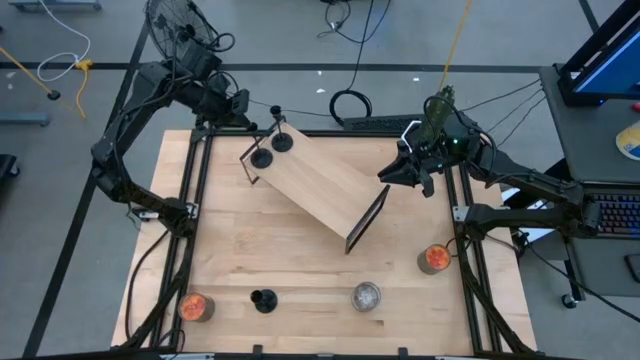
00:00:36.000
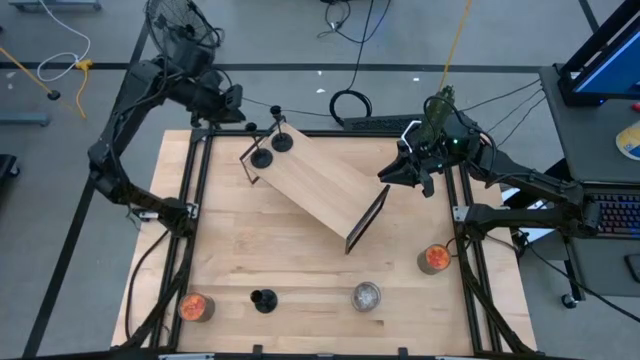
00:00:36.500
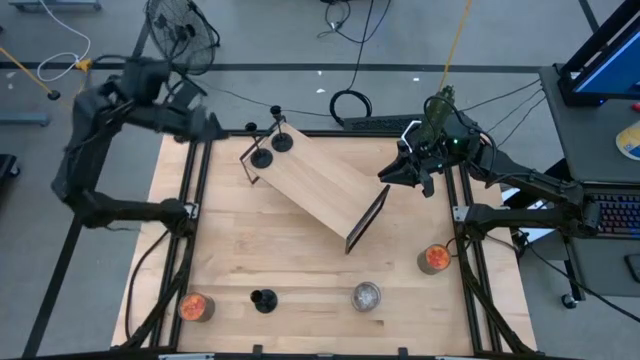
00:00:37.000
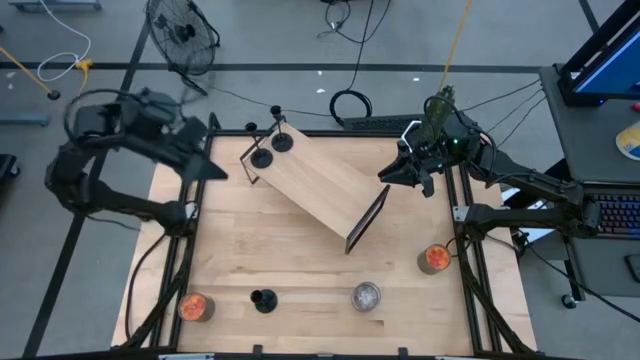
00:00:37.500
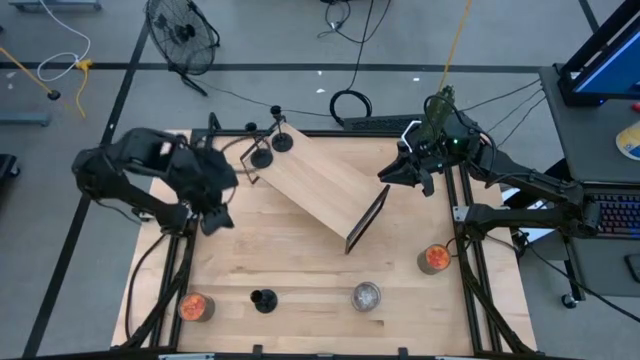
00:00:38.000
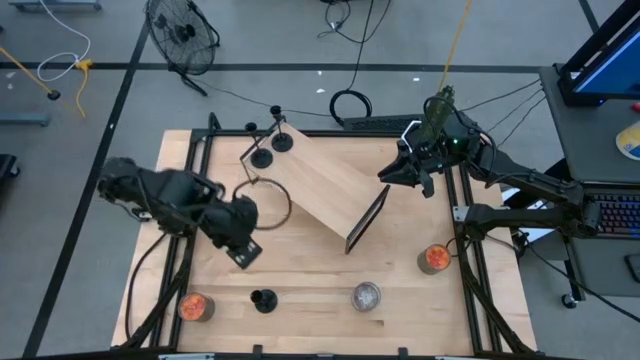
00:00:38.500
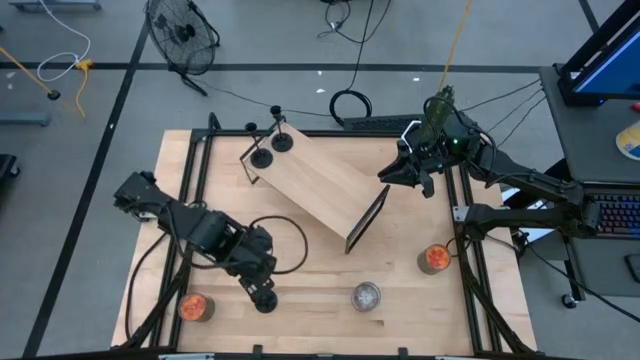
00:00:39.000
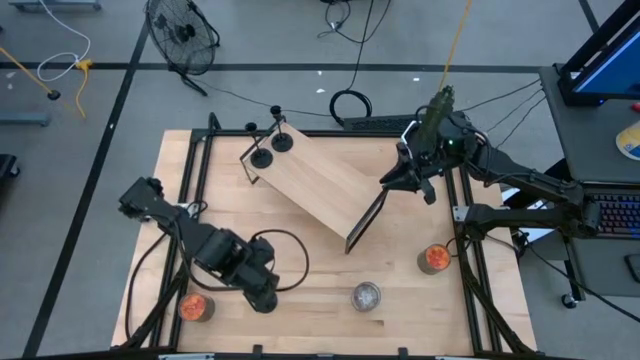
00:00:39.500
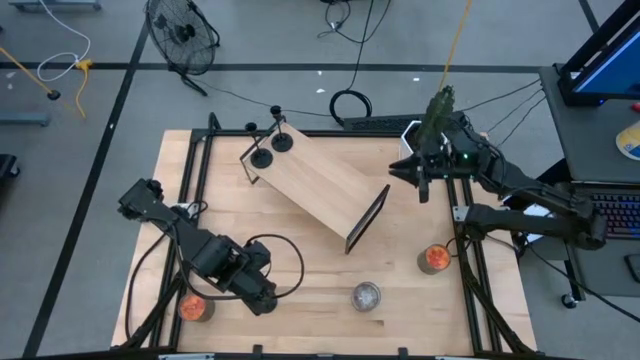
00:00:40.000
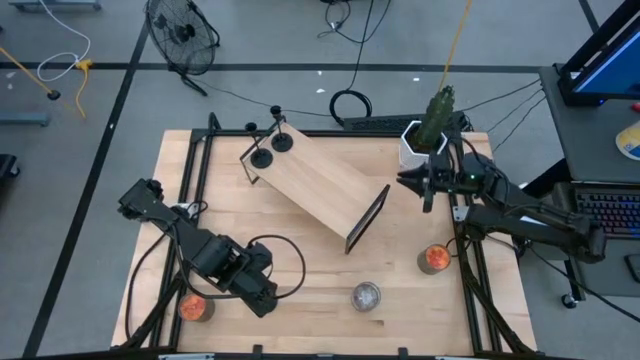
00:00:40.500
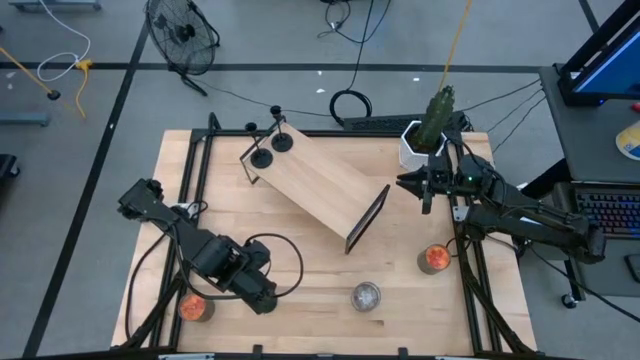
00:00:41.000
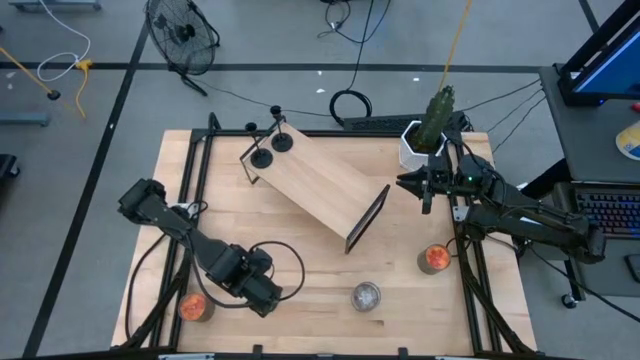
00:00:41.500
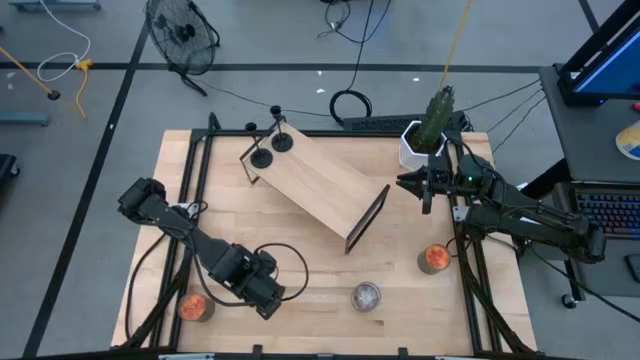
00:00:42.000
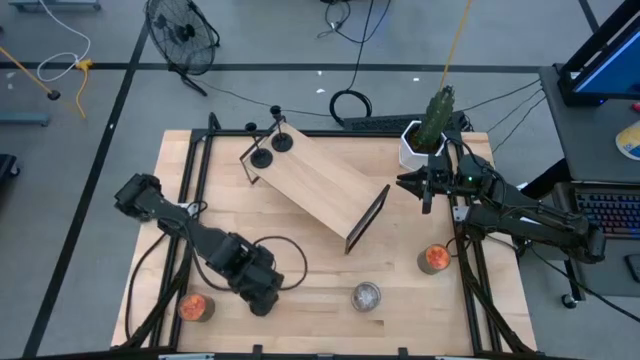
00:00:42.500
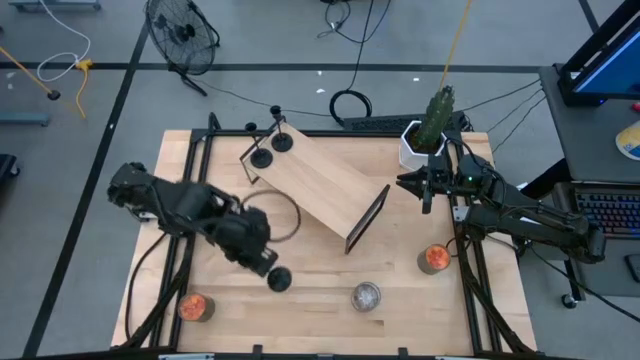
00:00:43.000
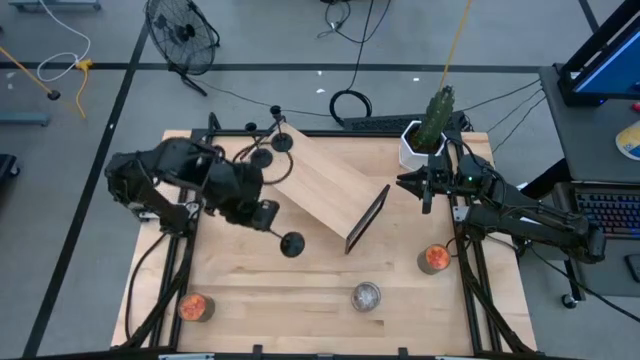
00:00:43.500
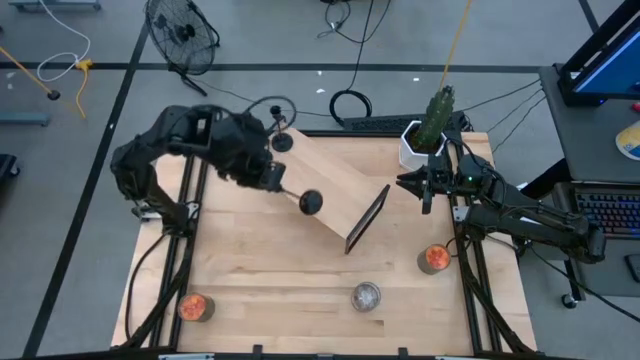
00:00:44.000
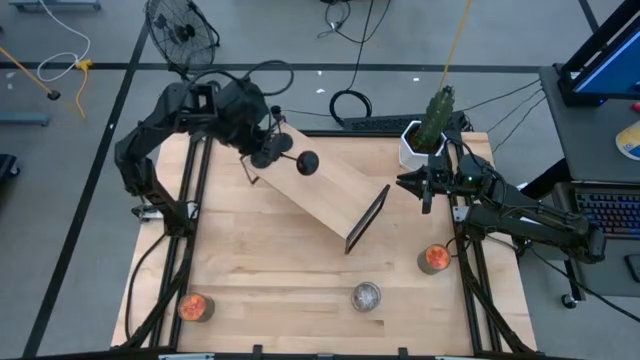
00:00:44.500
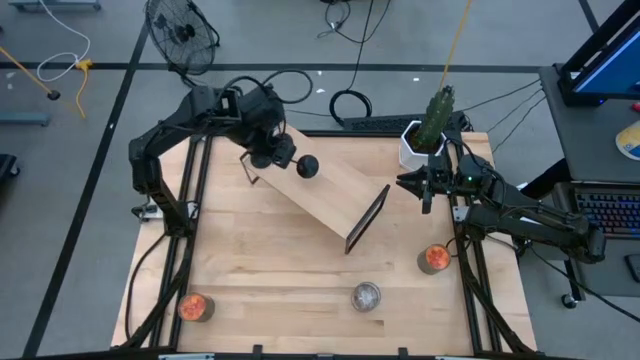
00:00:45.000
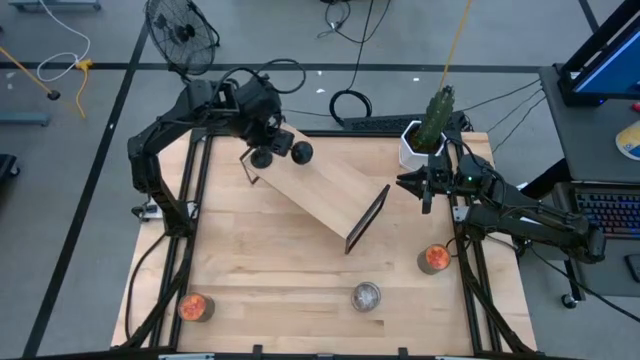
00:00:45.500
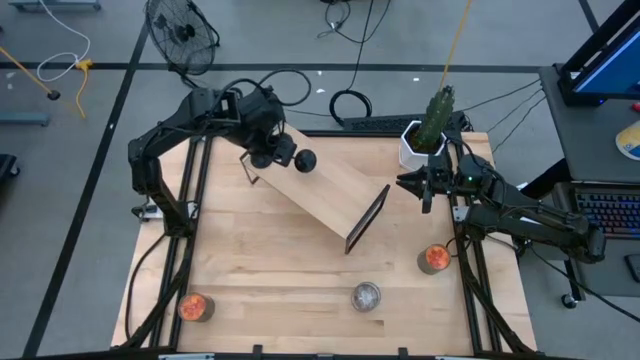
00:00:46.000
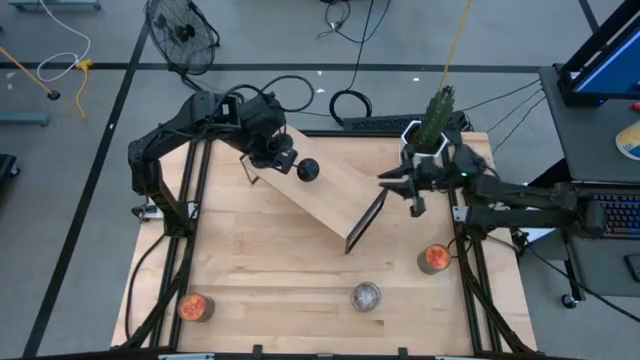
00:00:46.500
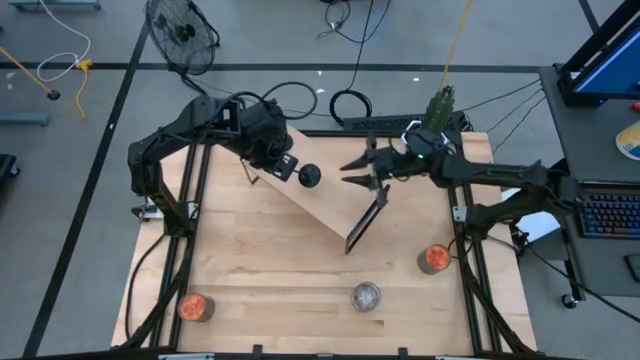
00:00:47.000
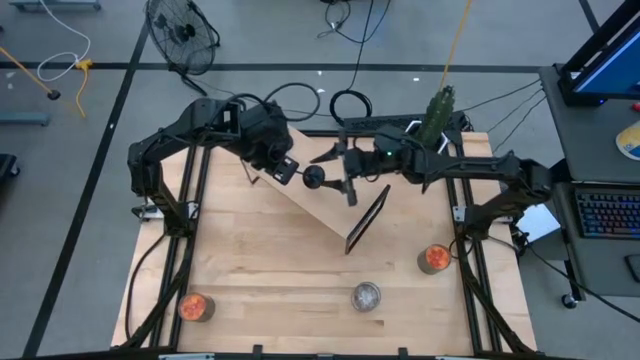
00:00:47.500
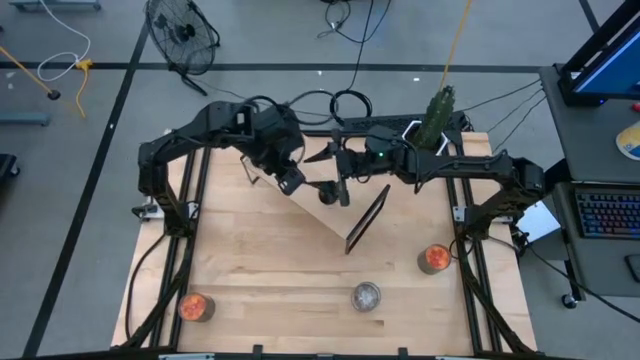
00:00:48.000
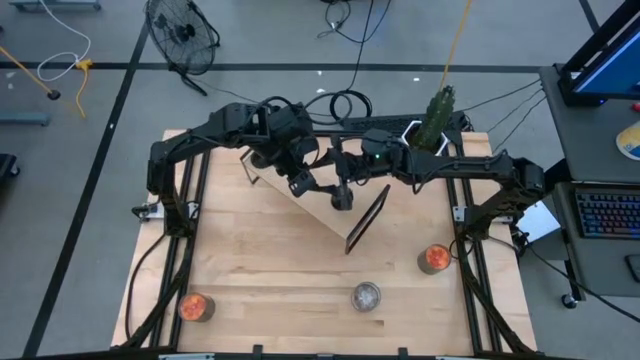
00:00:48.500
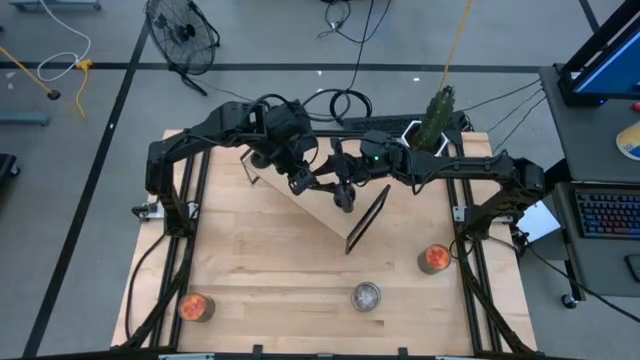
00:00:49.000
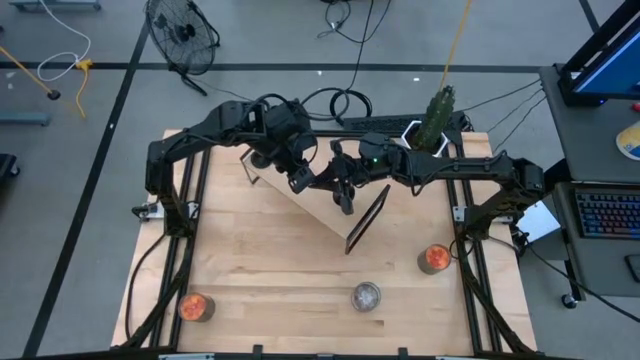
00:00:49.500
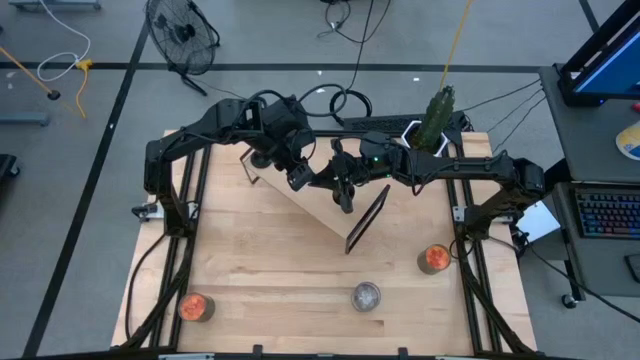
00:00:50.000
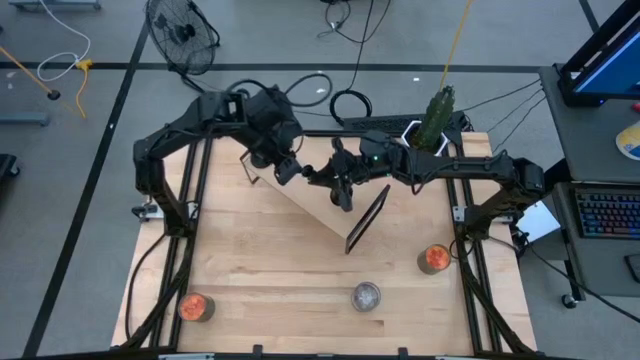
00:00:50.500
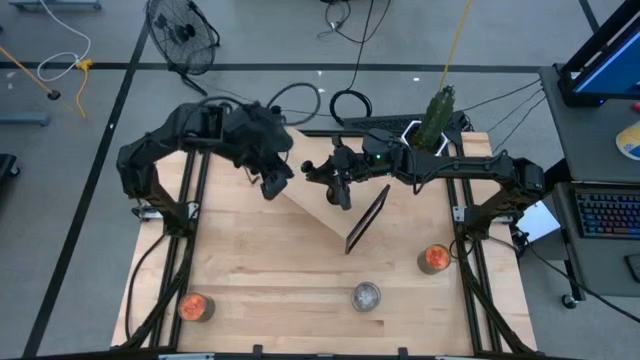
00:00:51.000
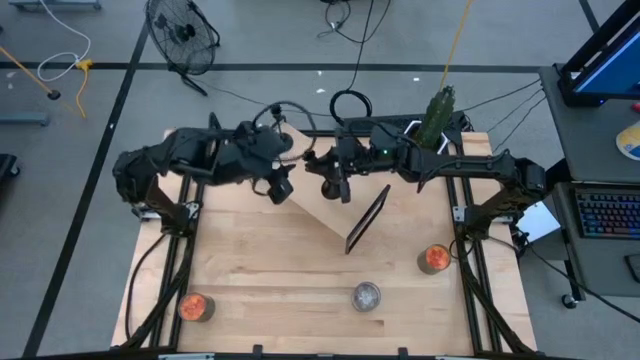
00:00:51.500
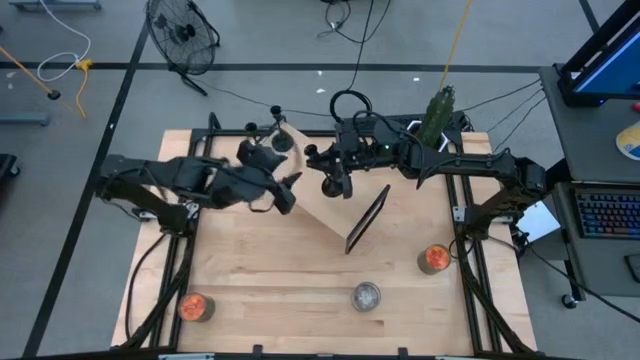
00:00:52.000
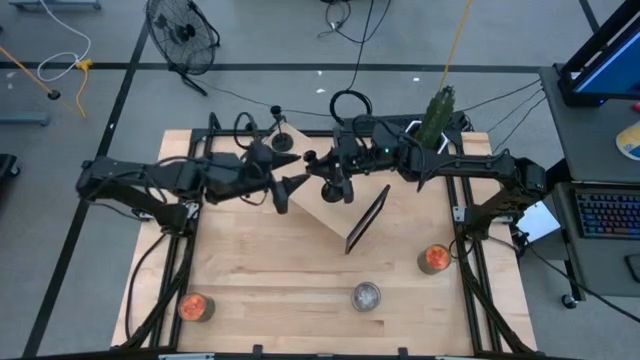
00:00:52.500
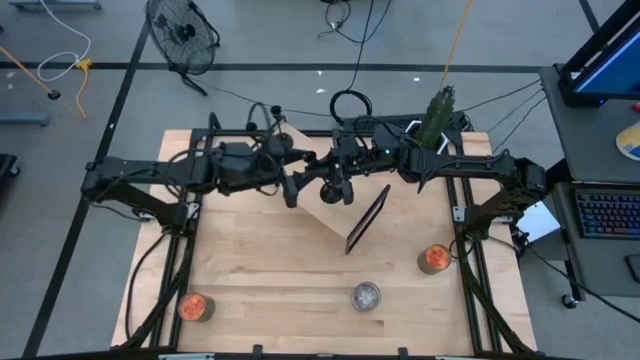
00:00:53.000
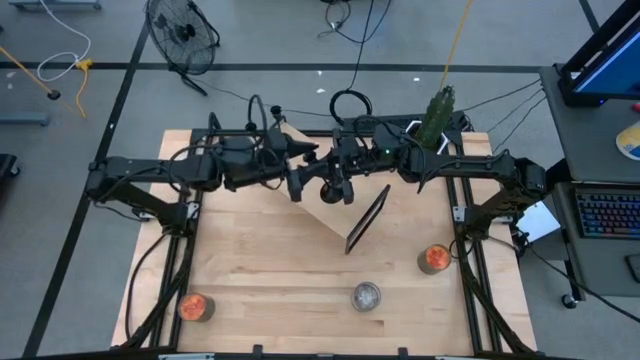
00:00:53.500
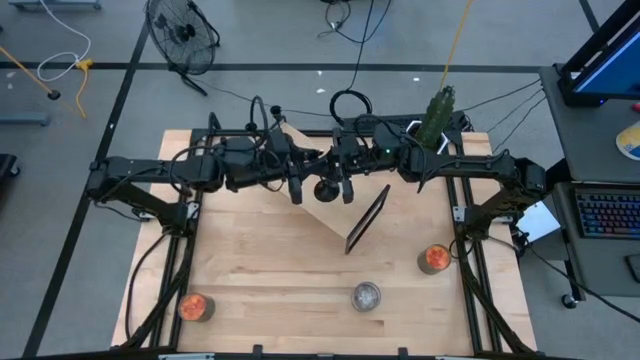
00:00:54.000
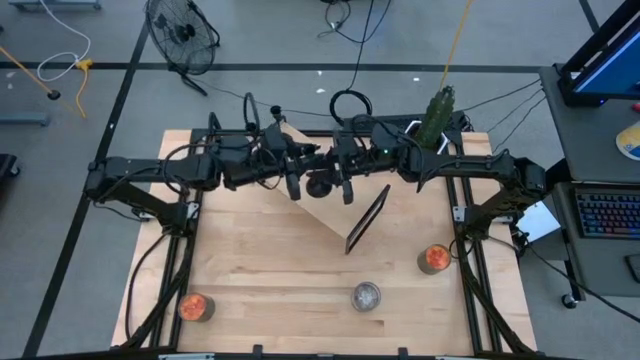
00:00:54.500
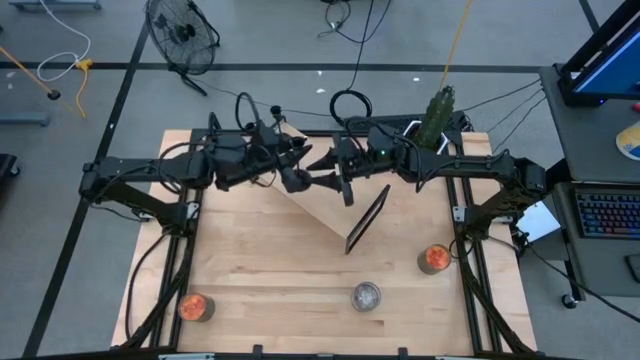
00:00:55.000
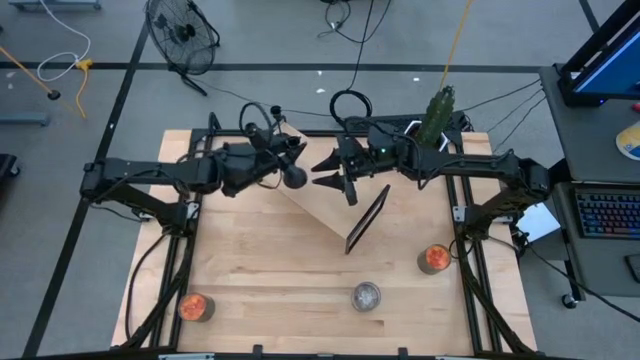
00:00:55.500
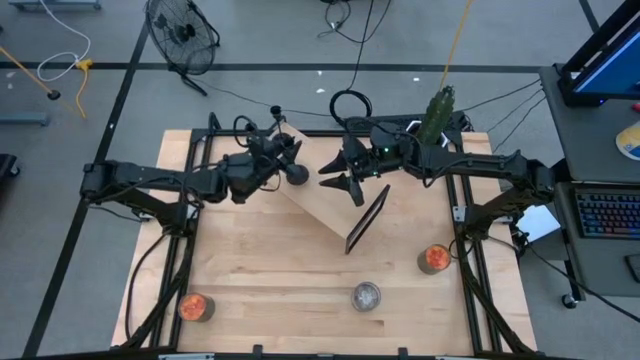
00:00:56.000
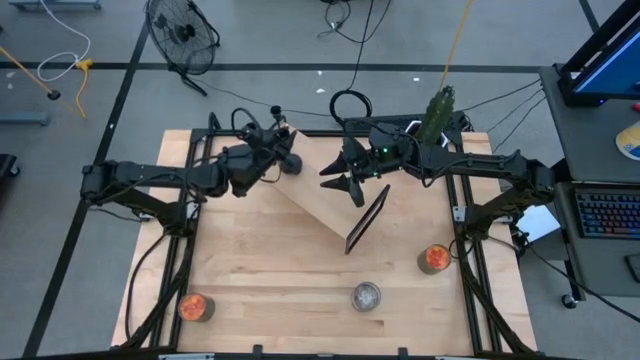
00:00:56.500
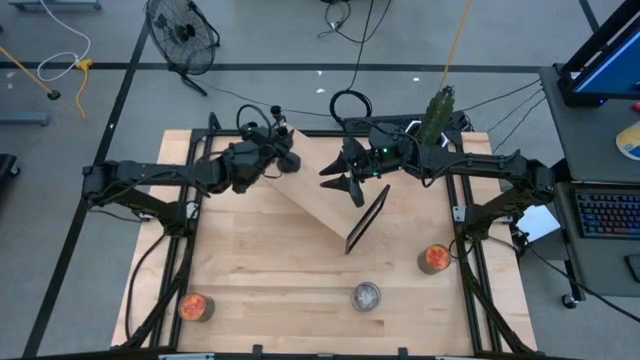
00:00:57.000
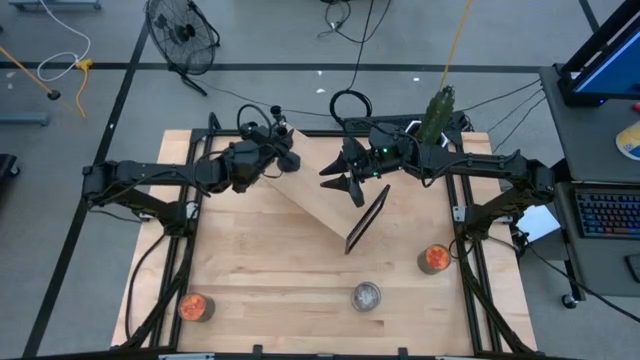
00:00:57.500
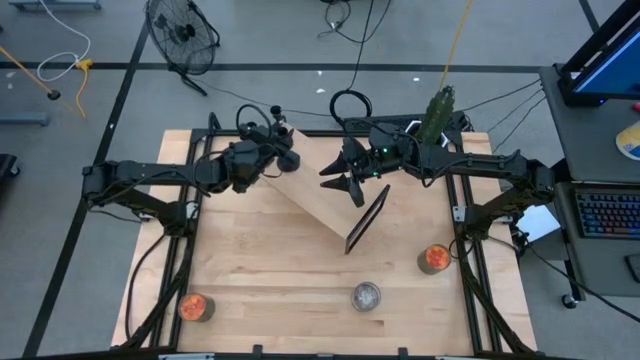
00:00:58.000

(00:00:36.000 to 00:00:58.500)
Task: Pick & Place candle stick holders
Put the black candle holder on the shelf
